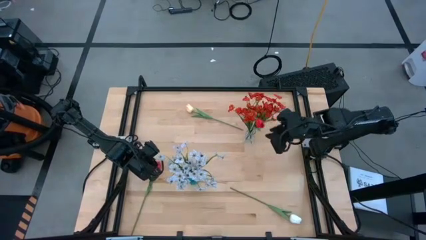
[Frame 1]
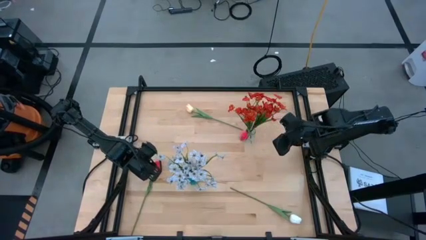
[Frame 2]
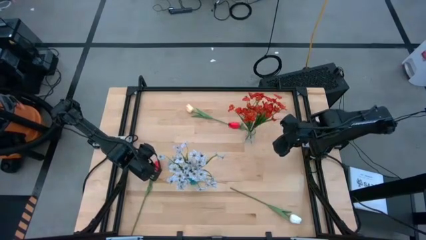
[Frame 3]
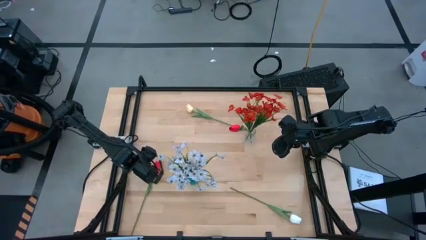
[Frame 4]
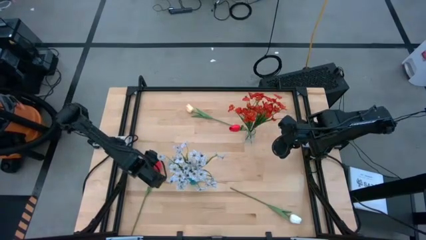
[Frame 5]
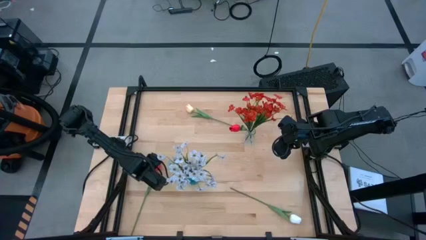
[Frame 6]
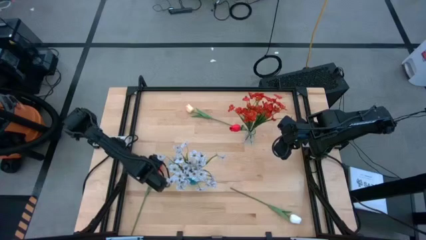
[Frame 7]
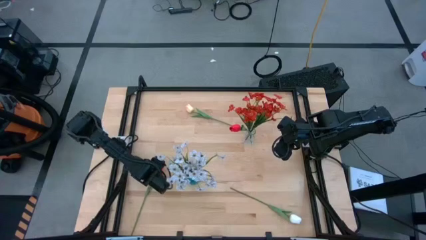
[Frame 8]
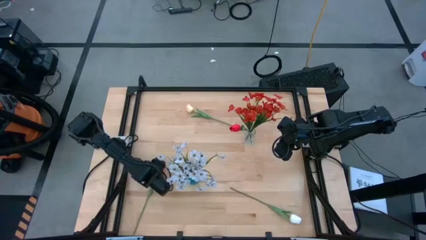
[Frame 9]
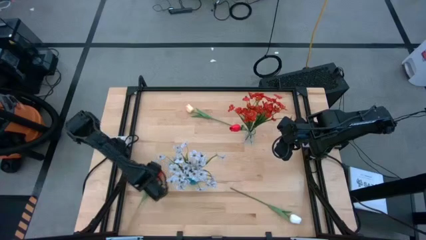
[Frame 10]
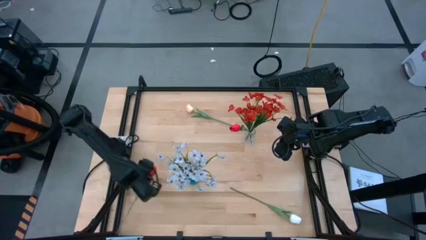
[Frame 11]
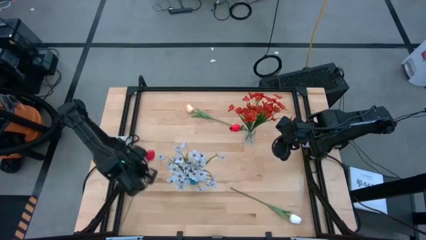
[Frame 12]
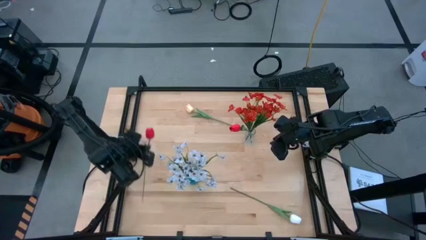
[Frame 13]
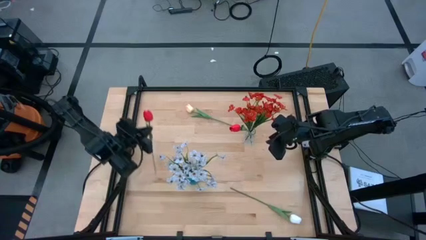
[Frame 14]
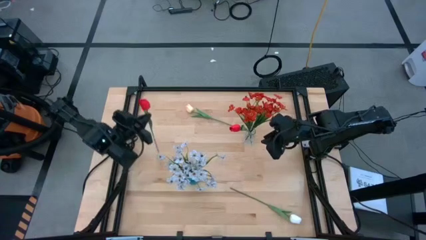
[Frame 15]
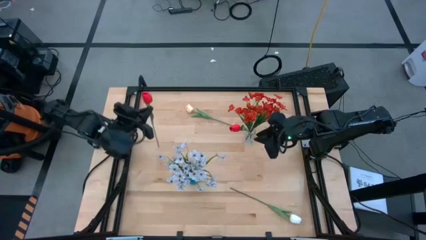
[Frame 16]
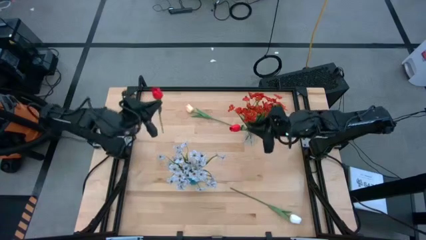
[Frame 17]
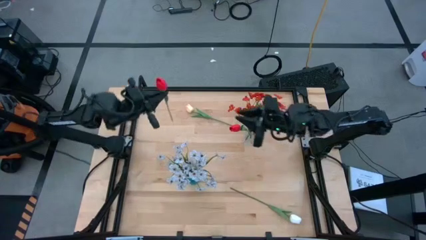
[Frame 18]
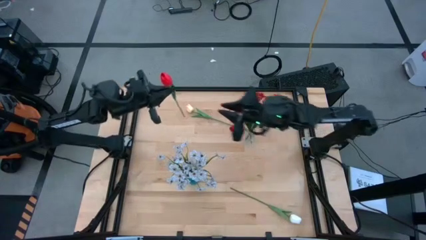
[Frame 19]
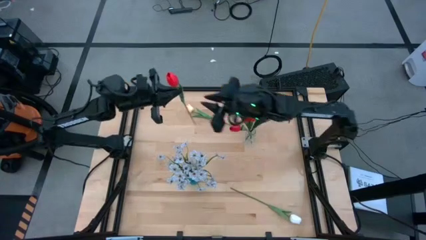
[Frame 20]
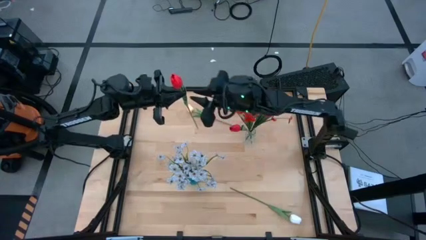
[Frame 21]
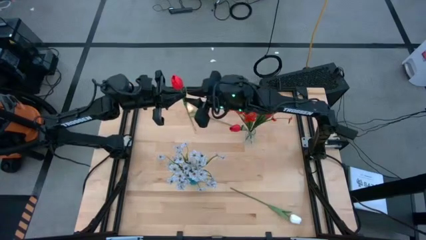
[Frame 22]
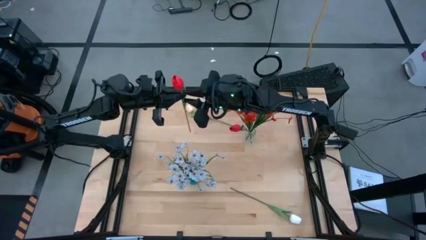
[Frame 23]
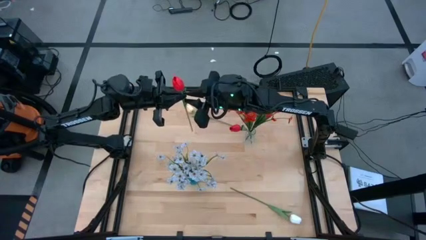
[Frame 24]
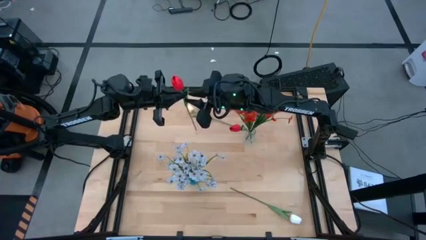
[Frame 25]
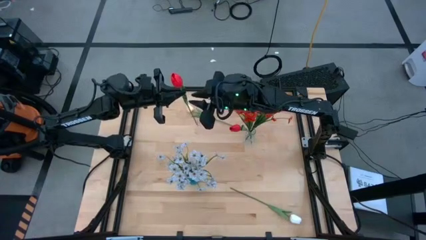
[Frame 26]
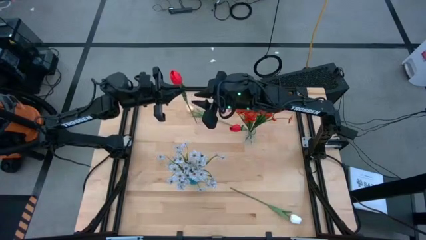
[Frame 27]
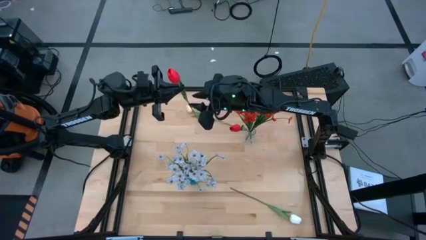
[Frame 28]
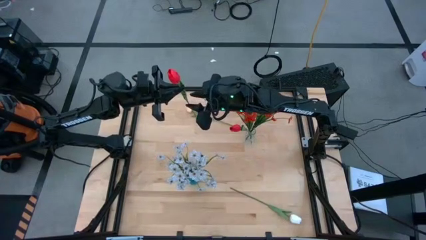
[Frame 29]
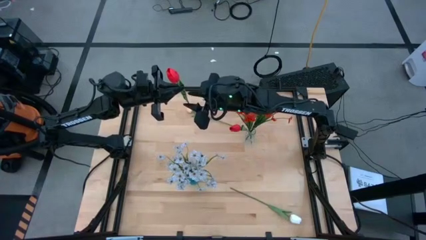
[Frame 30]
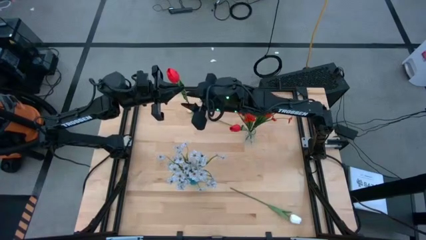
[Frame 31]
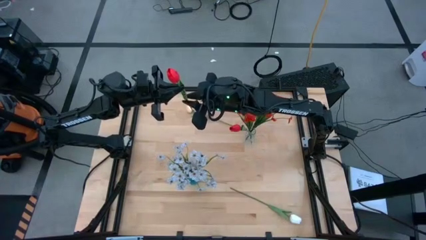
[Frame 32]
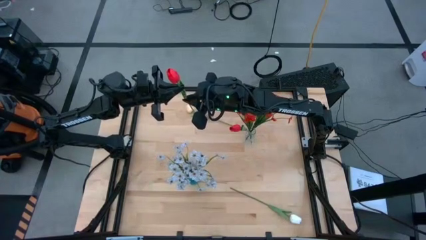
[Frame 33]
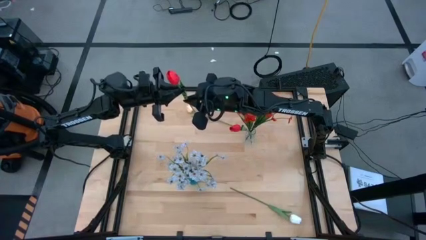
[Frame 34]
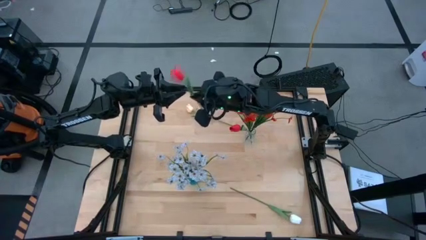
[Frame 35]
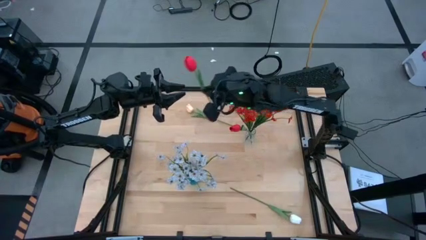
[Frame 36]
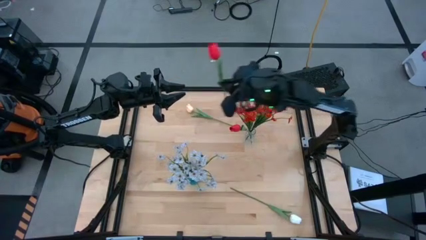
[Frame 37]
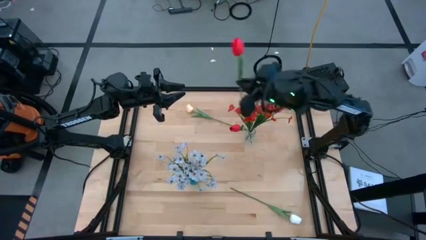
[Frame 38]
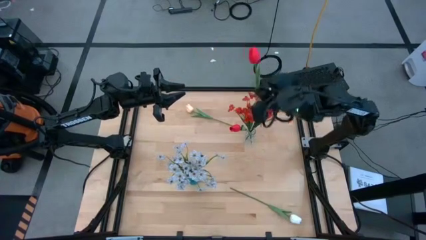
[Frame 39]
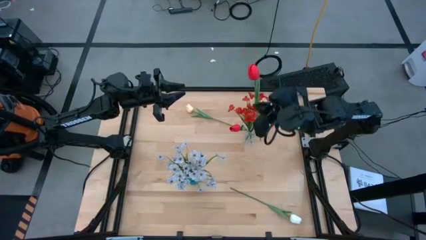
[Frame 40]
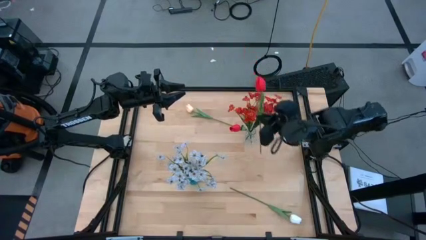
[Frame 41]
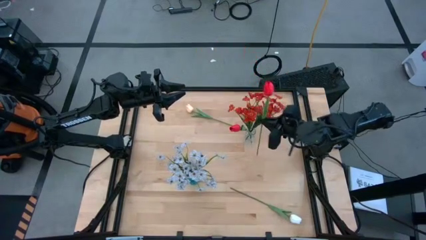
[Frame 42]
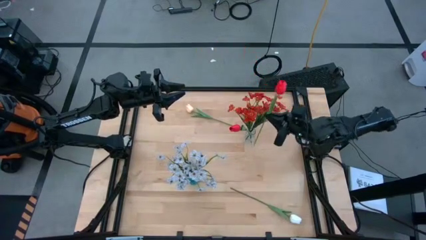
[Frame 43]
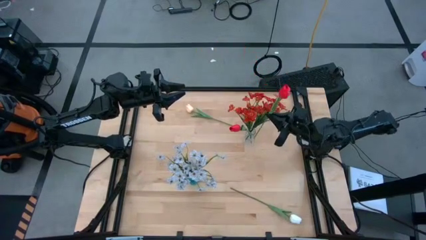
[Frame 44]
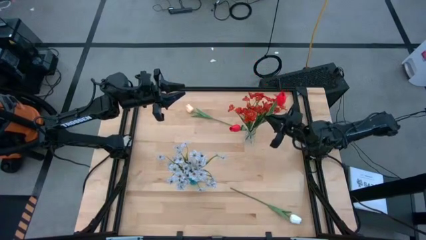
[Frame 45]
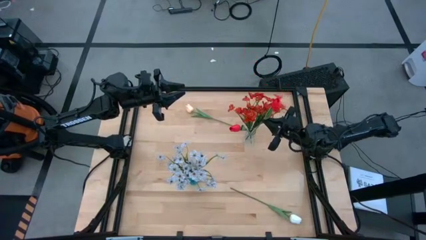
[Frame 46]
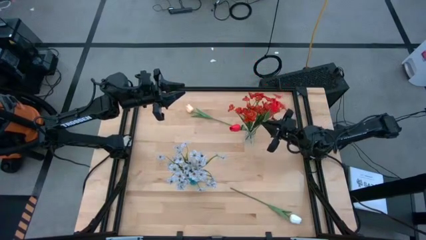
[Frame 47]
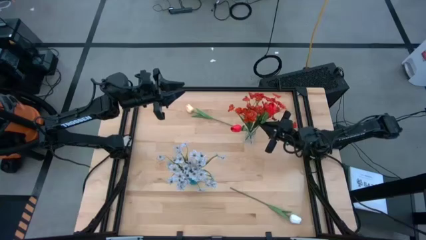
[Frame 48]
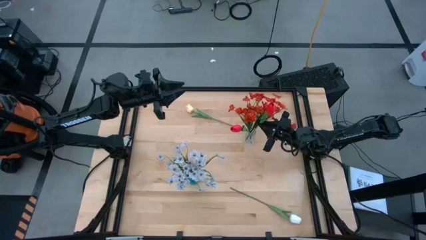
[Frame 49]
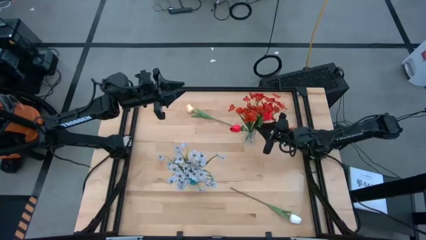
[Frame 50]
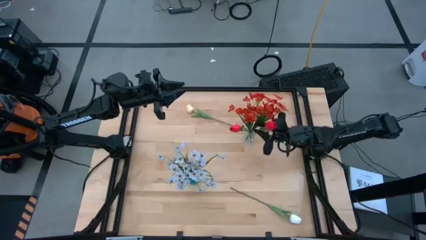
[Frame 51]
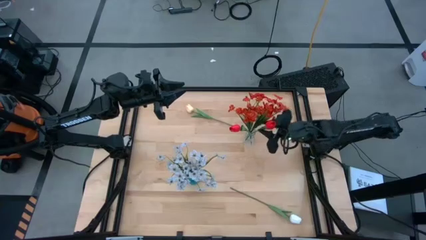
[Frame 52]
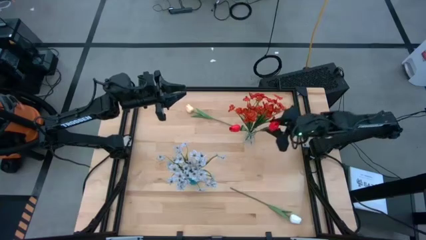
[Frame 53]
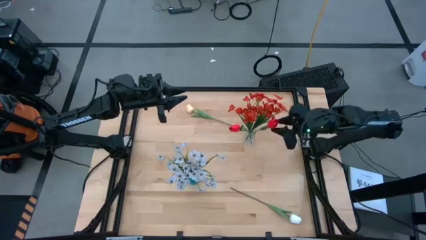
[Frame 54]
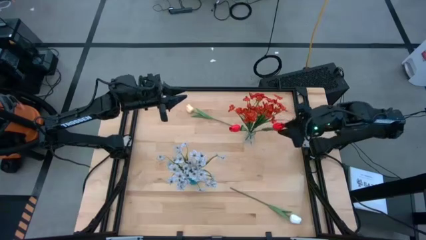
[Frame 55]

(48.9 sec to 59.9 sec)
Task: Sort flowers into vase by color
Put the red flower into the transparent flower vase

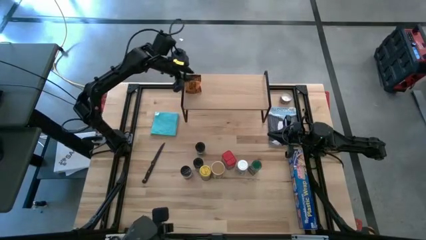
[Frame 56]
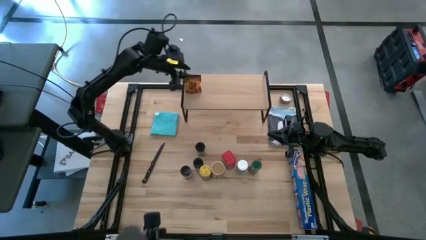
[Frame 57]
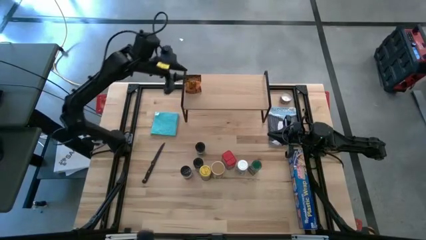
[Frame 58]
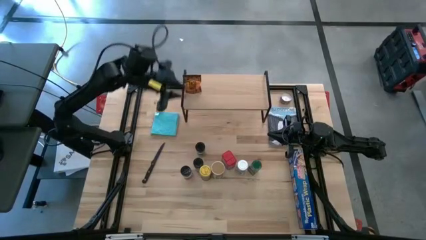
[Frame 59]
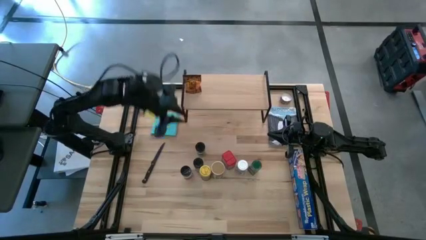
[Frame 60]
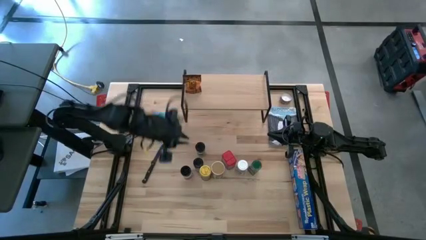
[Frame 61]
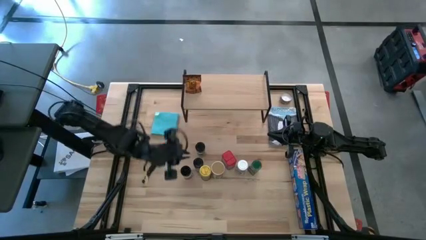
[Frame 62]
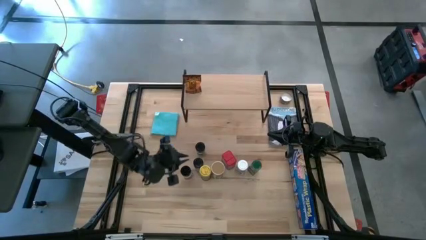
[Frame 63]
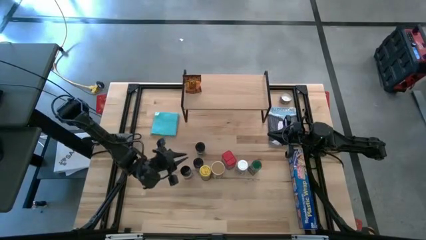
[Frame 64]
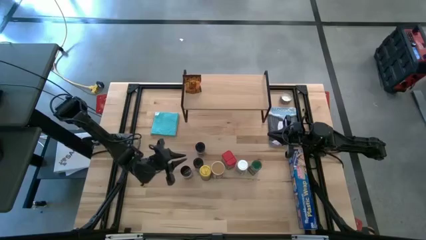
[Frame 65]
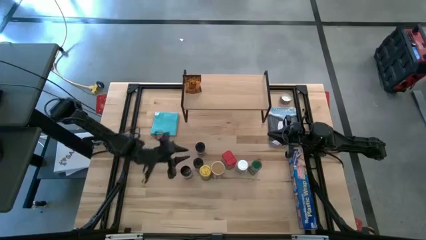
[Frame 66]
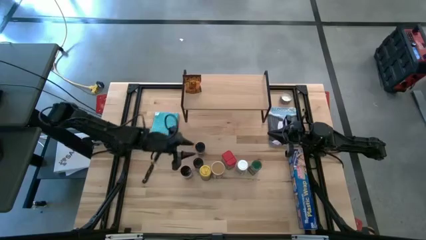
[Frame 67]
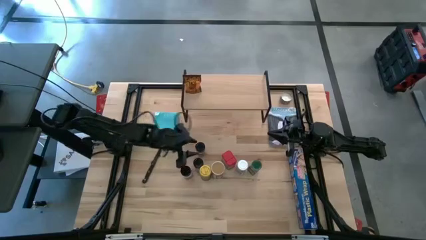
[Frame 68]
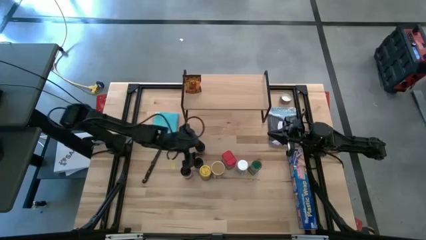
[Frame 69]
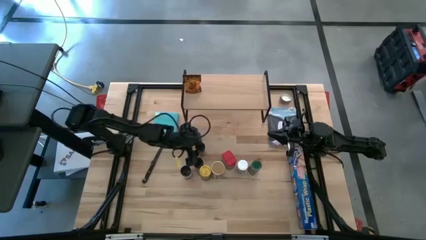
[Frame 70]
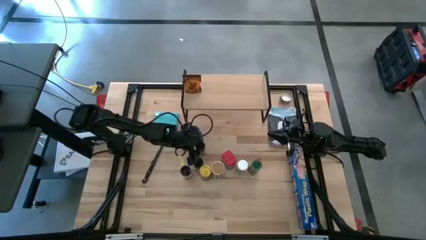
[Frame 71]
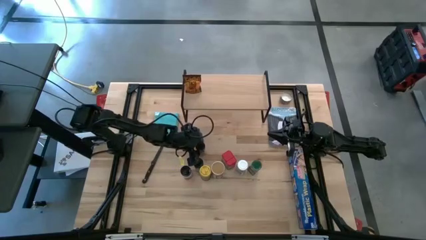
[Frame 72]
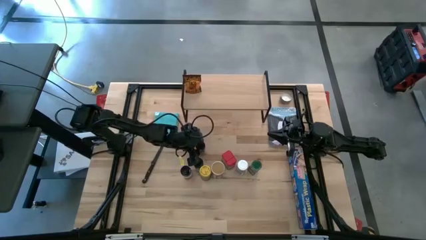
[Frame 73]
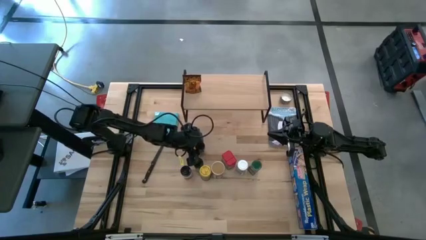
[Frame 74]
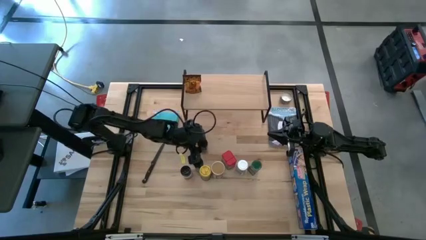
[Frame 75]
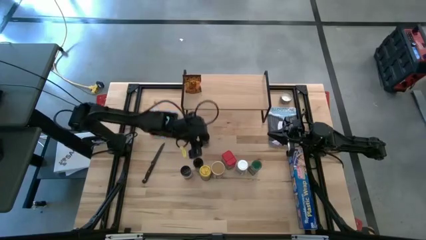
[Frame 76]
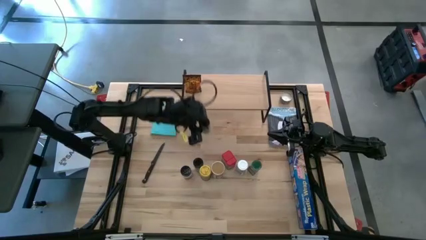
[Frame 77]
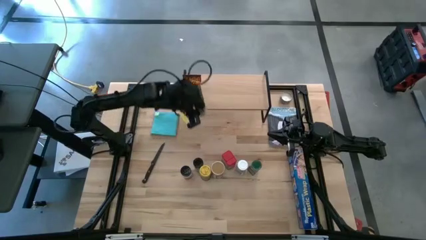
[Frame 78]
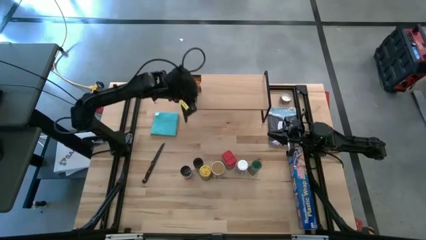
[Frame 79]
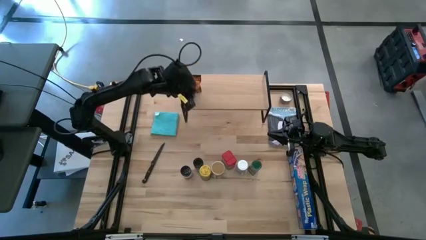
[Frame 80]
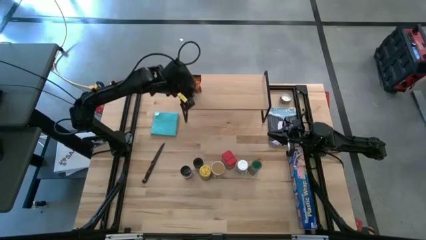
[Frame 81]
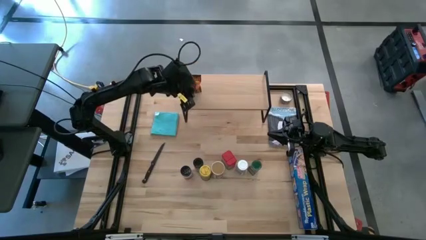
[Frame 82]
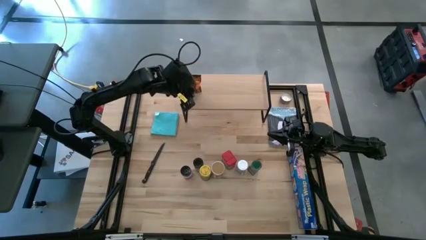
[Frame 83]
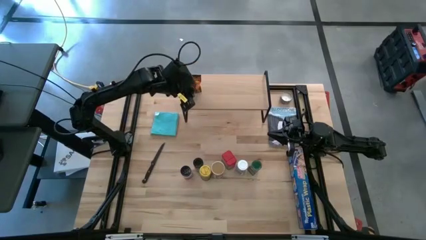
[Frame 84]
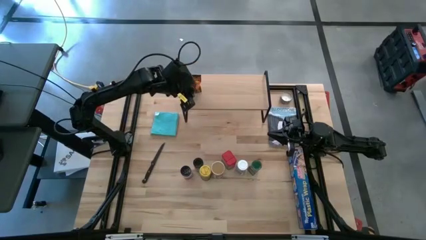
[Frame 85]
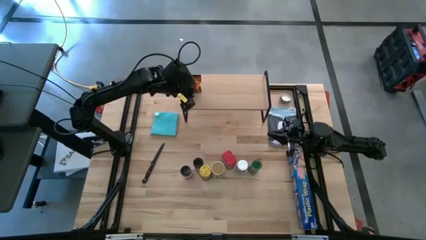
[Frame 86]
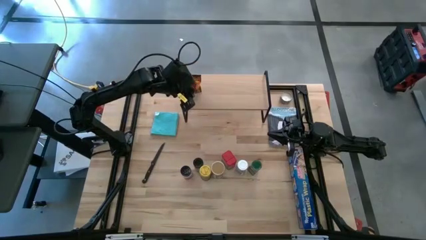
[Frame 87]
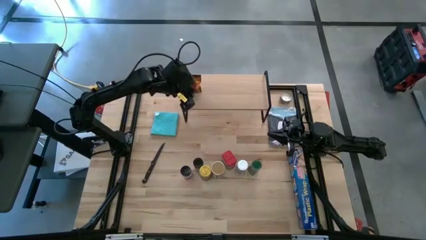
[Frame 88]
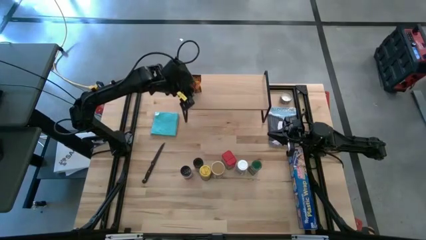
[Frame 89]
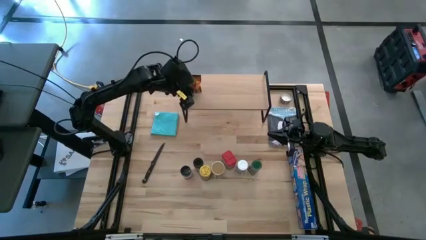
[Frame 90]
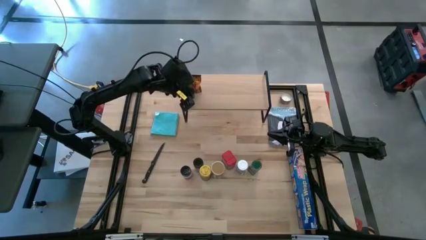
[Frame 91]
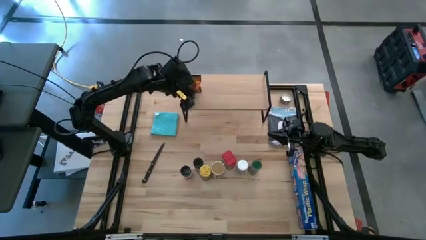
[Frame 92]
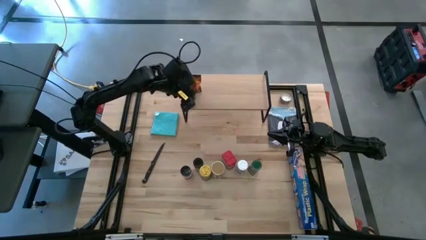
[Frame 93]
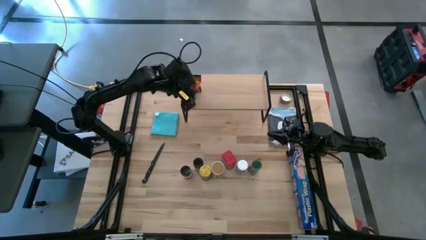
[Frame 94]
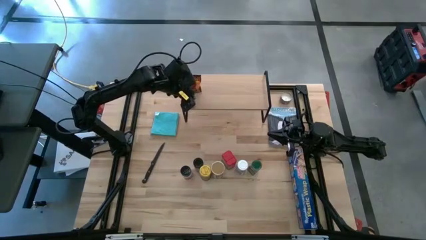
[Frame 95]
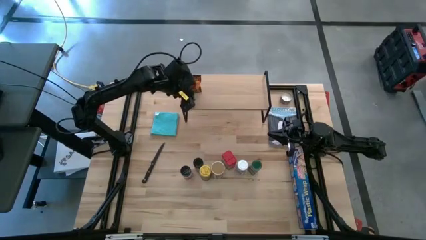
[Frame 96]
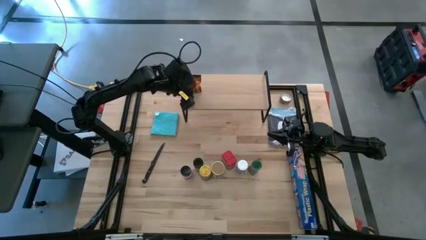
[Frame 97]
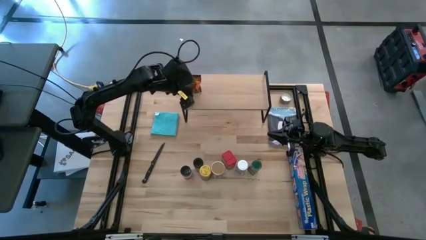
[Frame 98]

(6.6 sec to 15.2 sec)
Task: Shelf spices
Put the top right black seasoning bottle on the shelf
